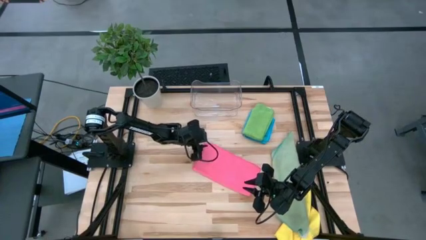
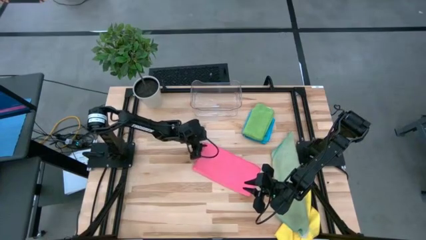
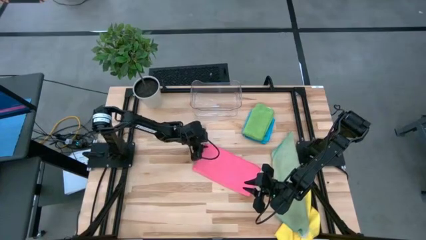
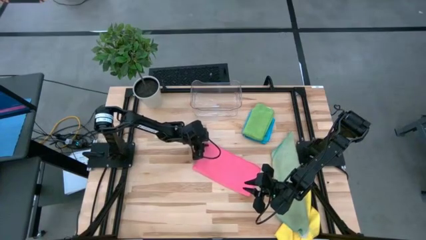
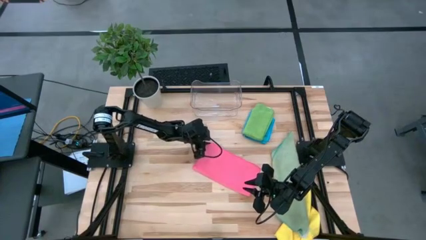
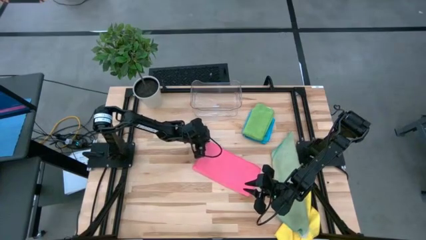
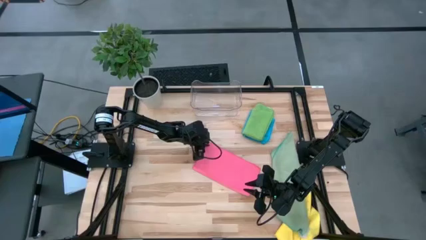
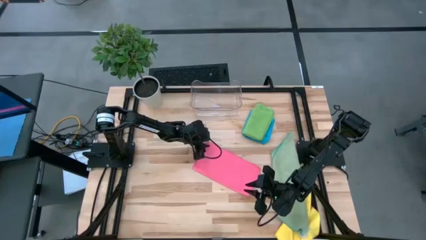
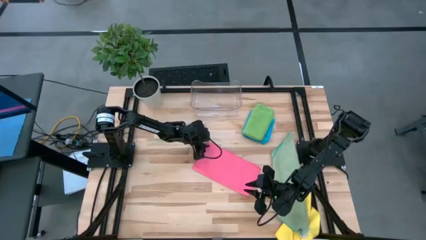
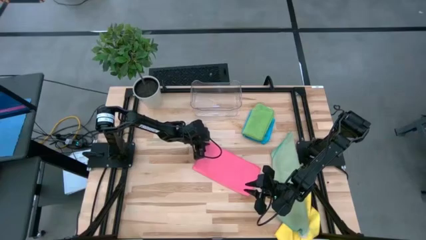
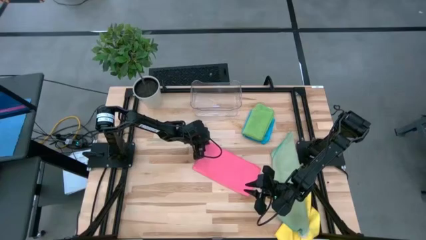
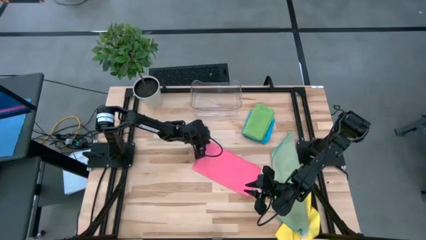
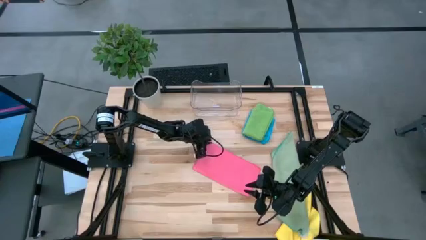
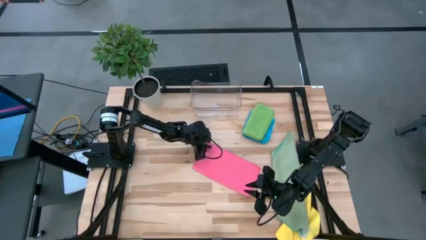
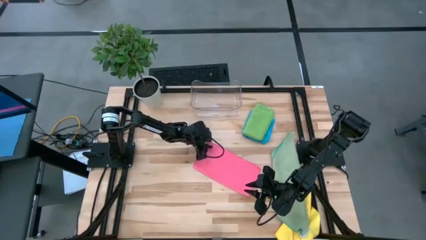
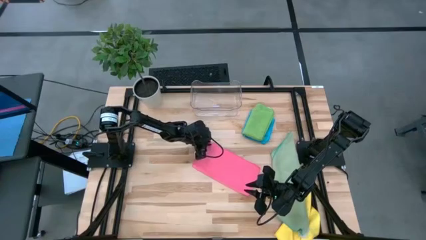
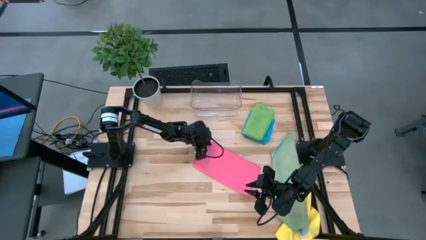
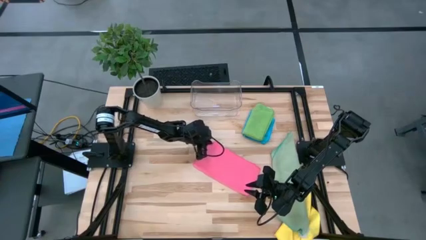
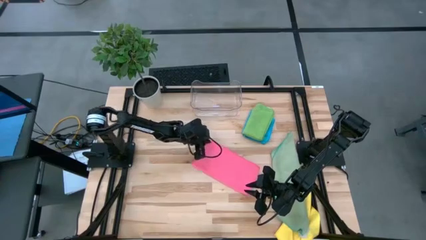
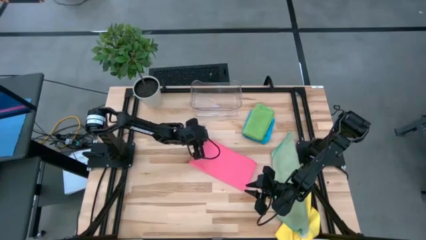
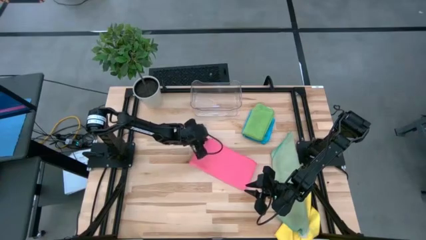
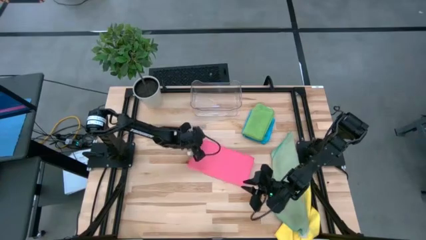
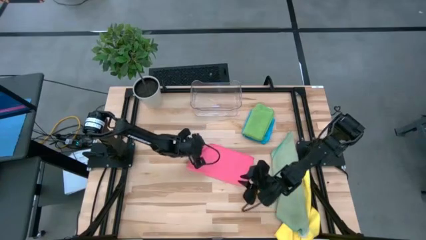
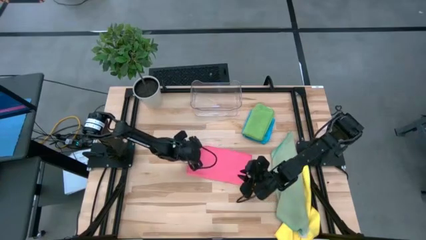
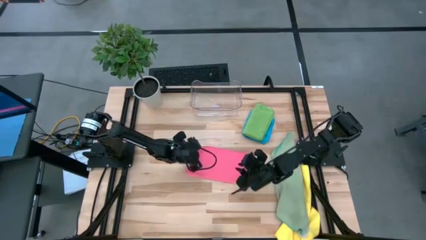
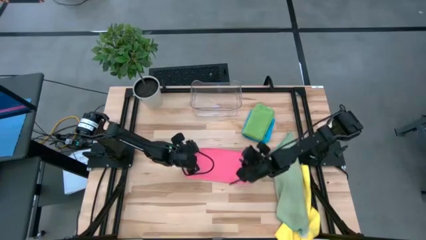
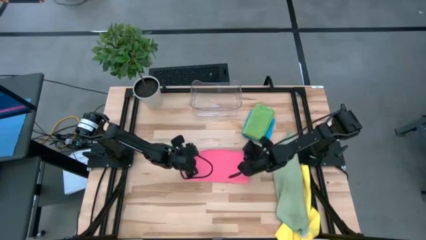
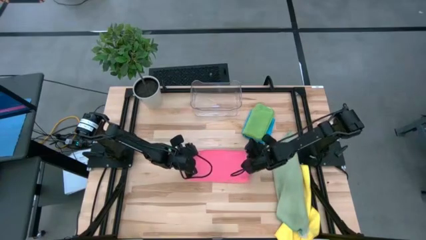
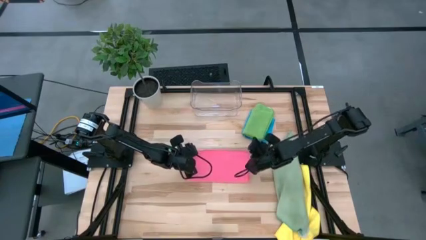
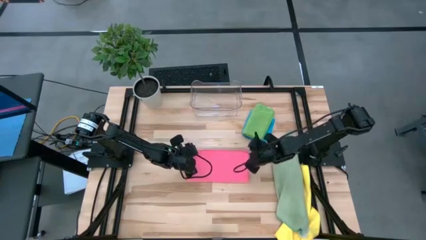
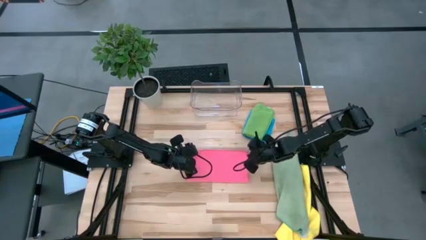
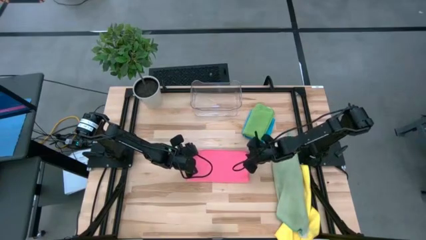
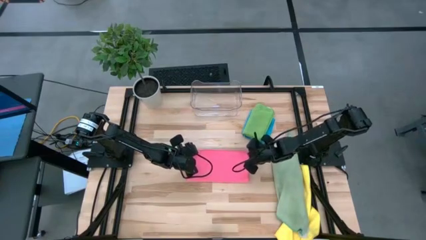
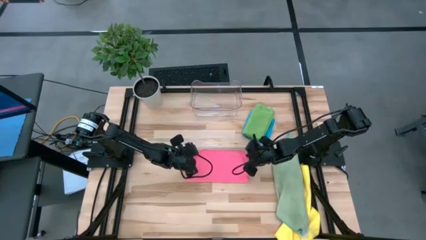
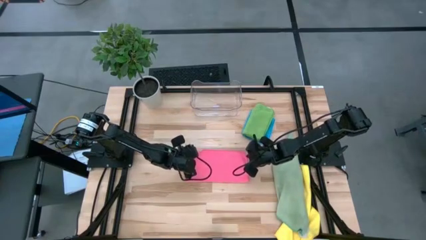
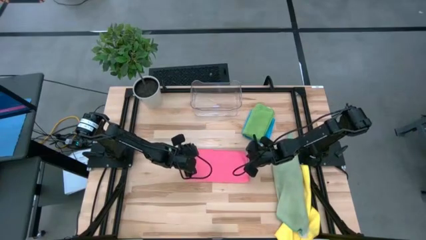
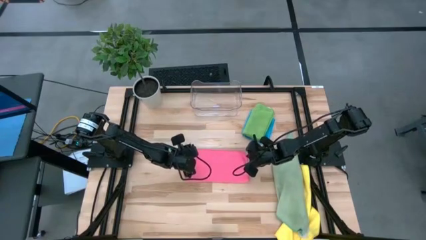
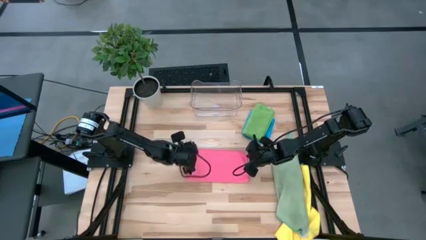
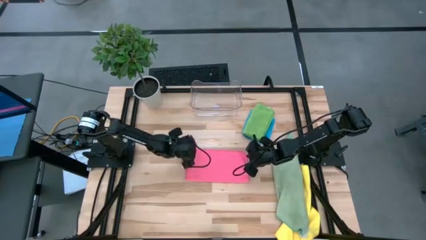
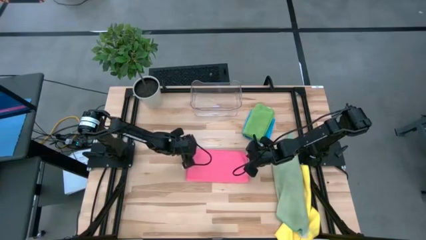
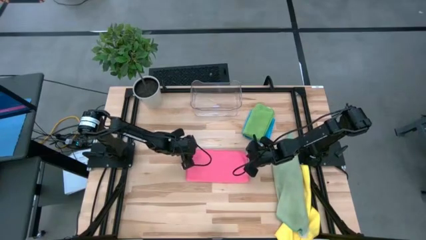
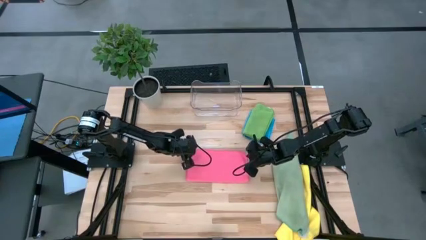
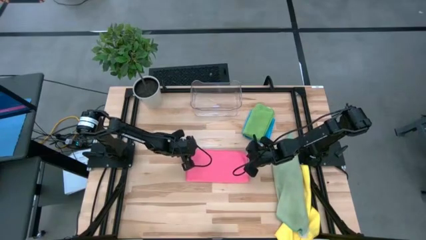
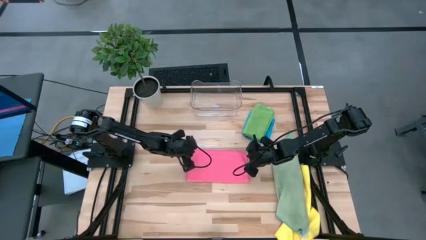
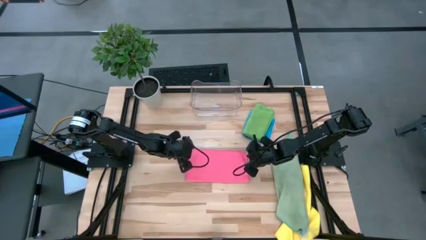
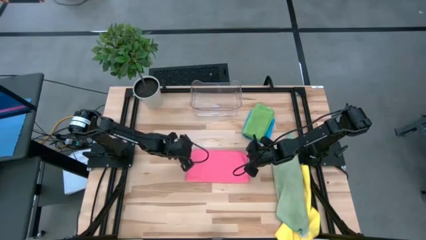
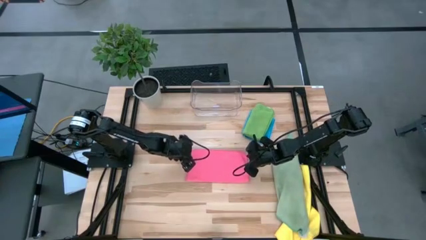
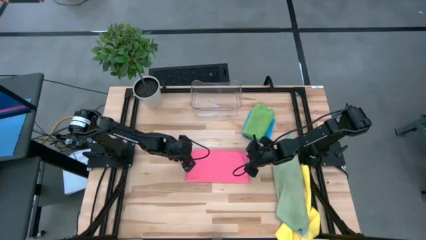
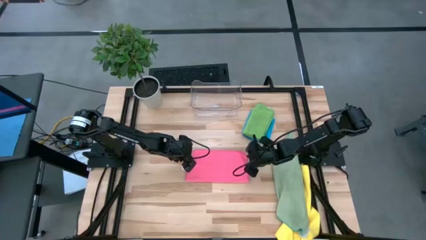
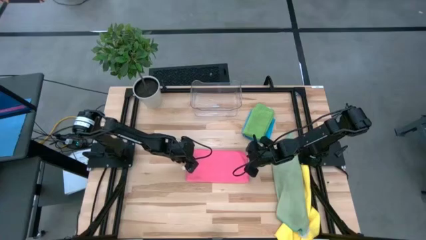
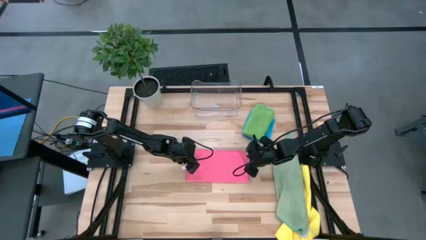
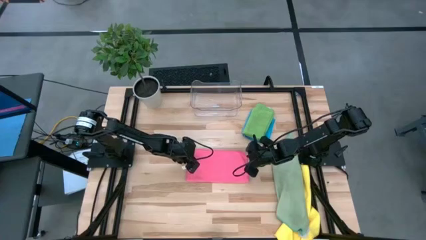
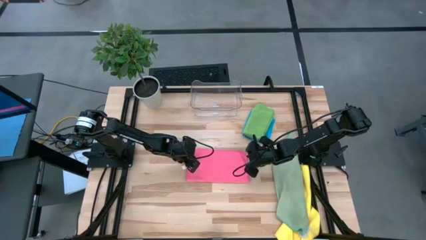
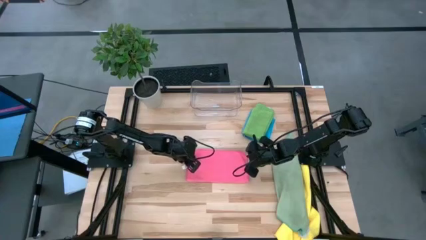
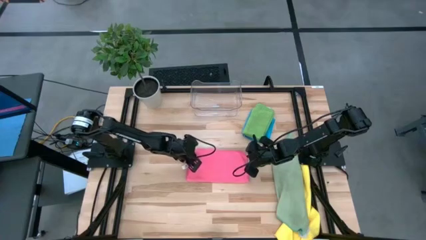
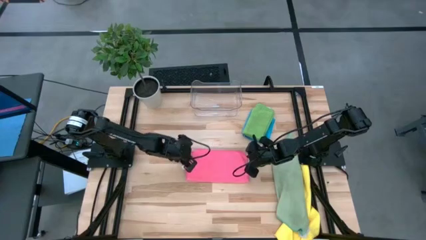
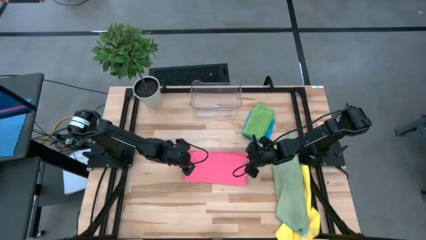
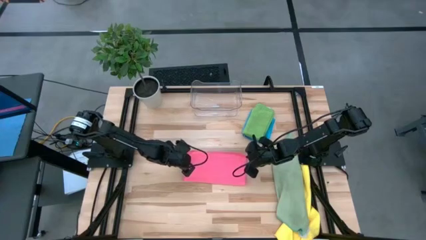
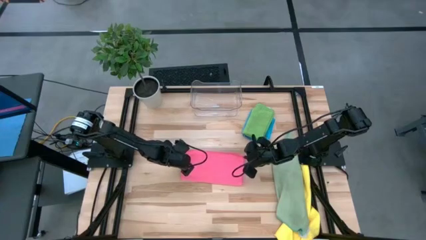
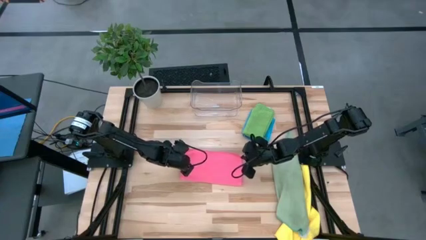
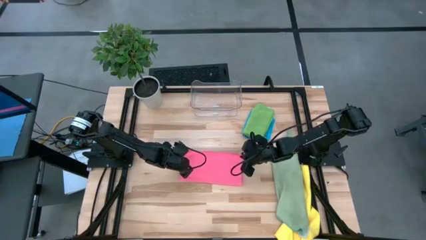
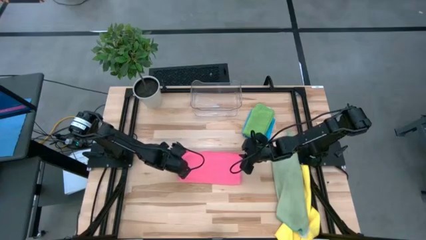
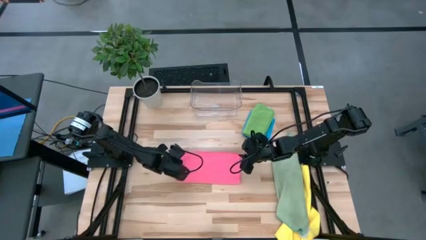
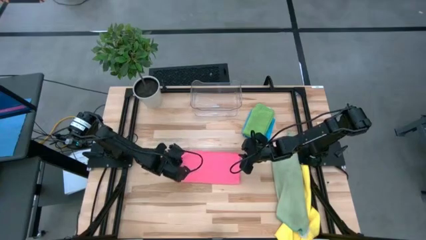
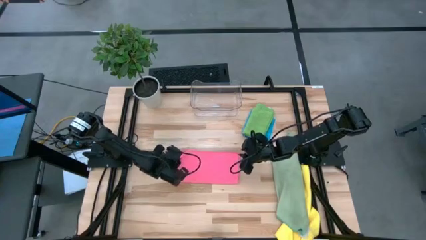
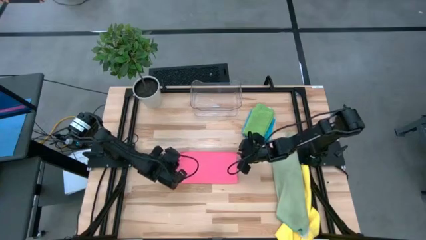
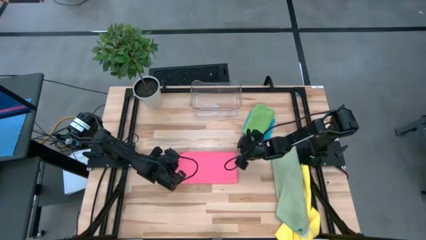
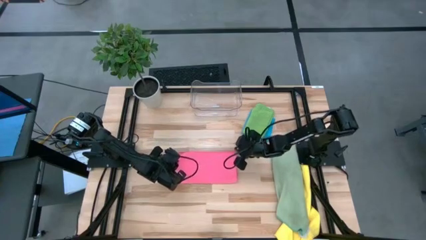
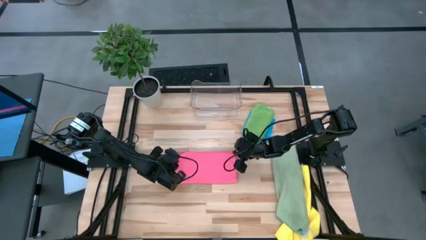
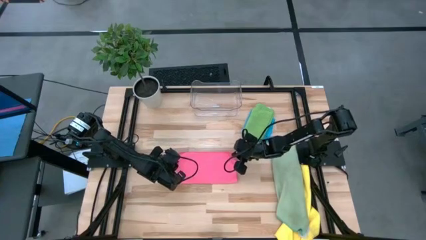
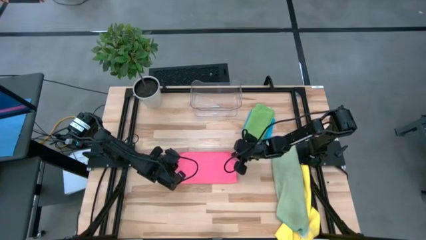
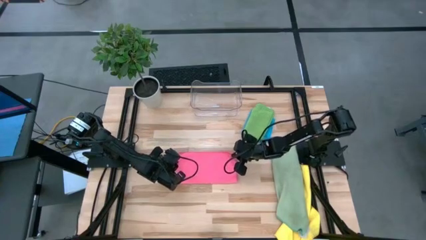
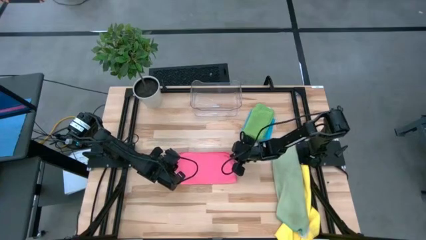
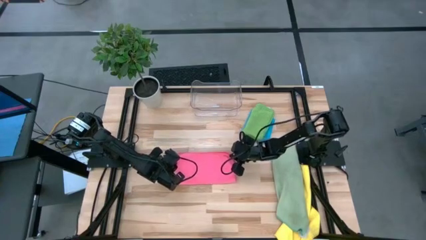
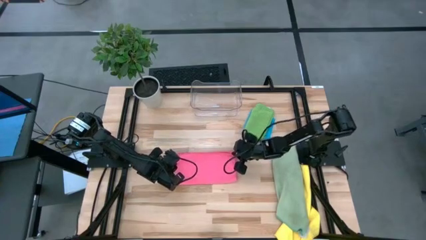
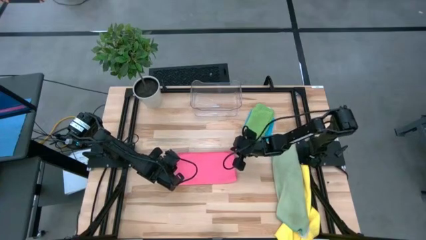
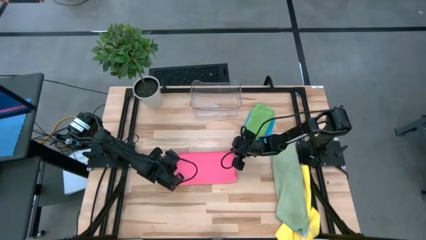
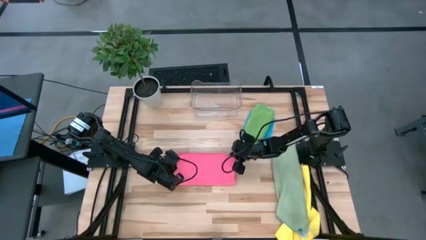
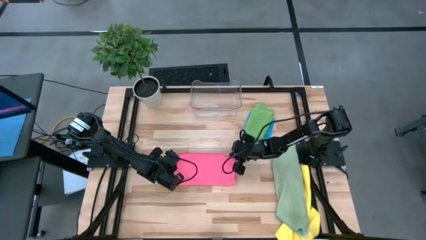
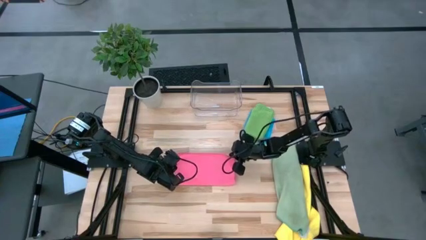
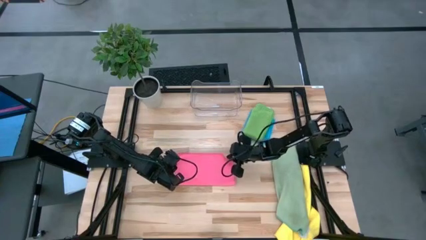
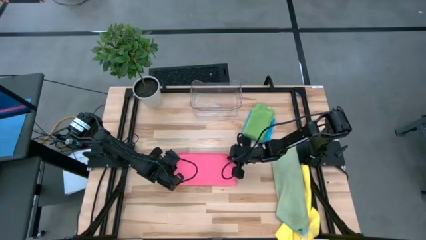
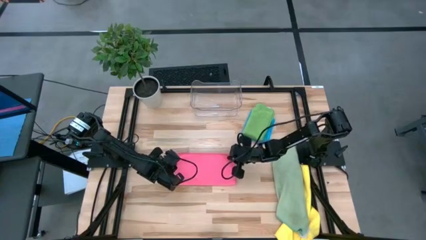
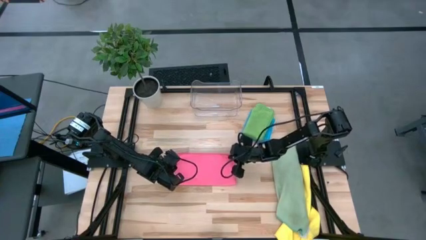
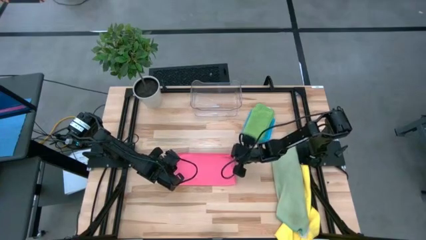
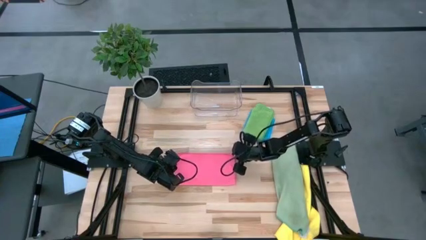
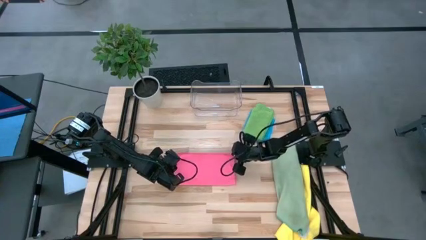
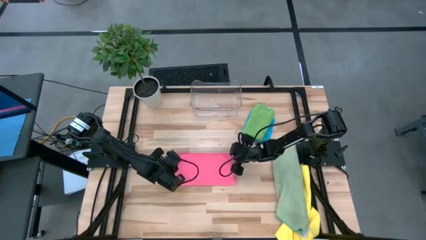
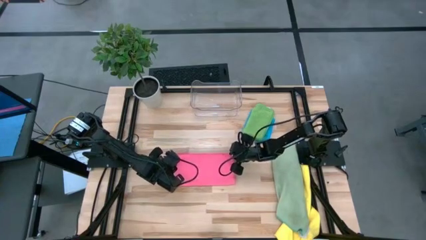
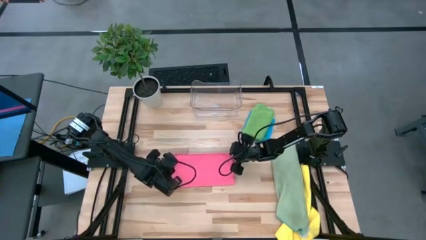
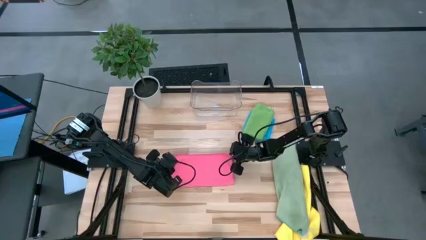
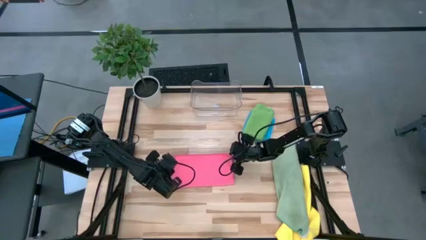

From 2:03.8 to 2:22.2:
Task: Fold microfiber towels
Fold pink microfiber towel
